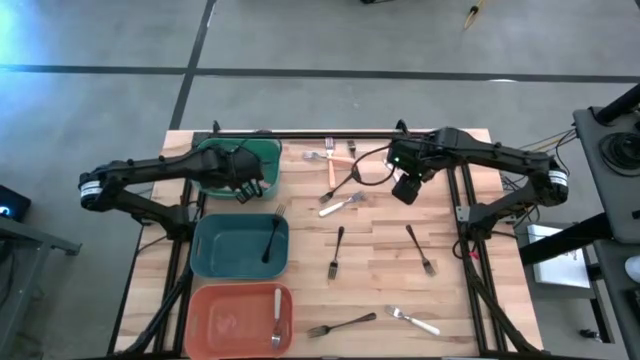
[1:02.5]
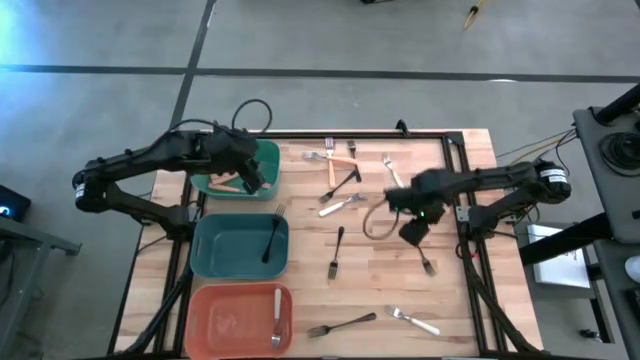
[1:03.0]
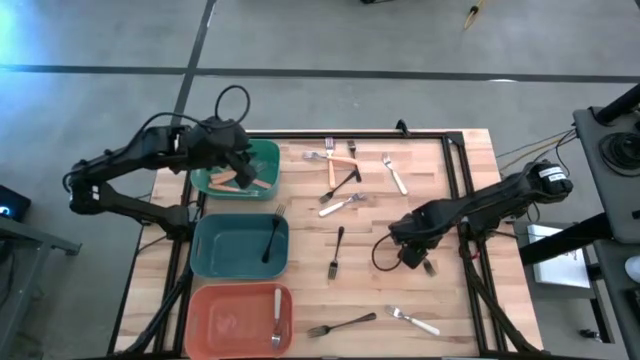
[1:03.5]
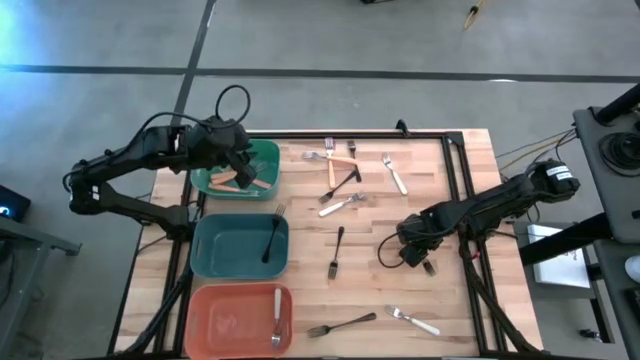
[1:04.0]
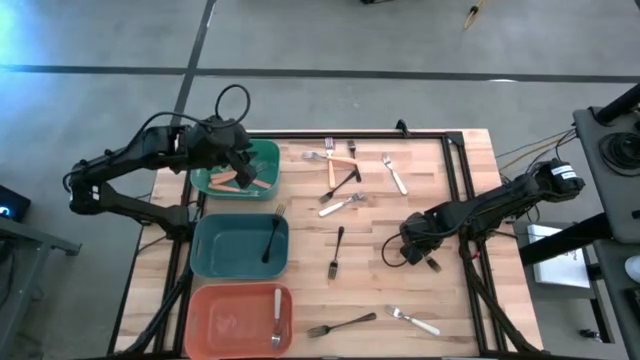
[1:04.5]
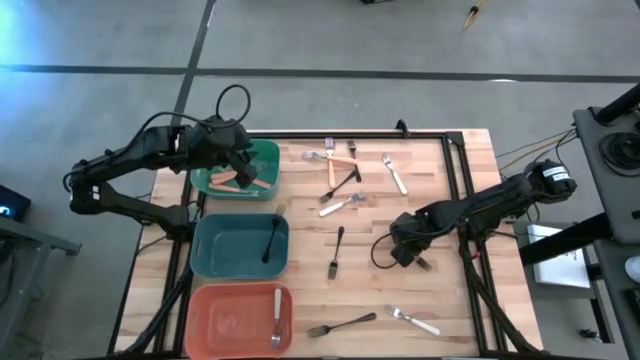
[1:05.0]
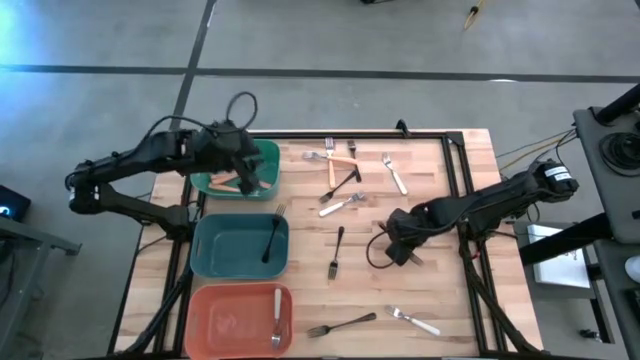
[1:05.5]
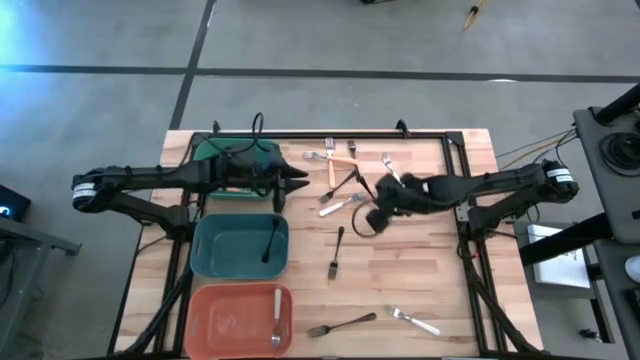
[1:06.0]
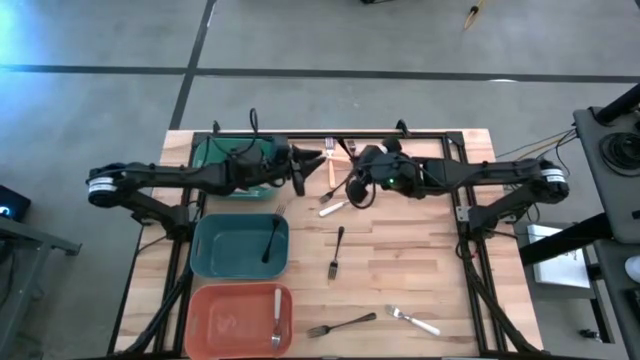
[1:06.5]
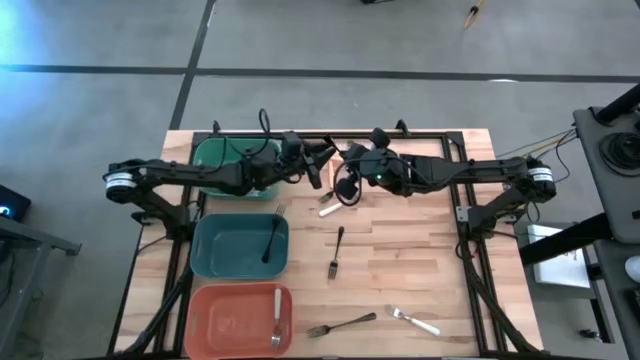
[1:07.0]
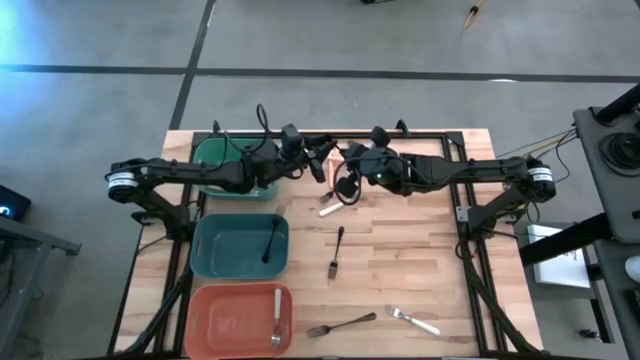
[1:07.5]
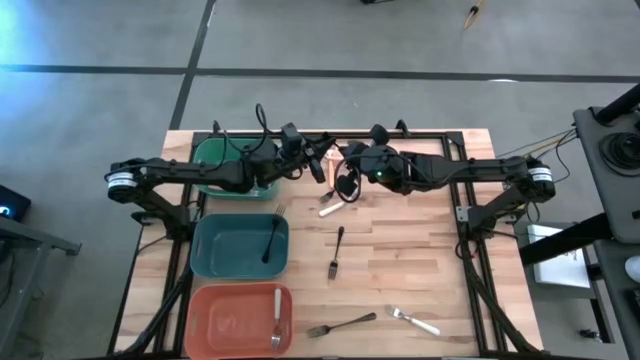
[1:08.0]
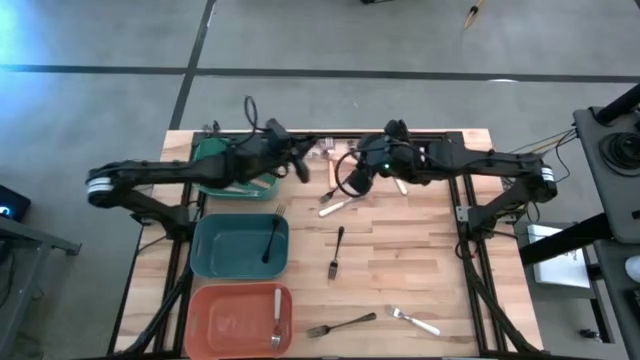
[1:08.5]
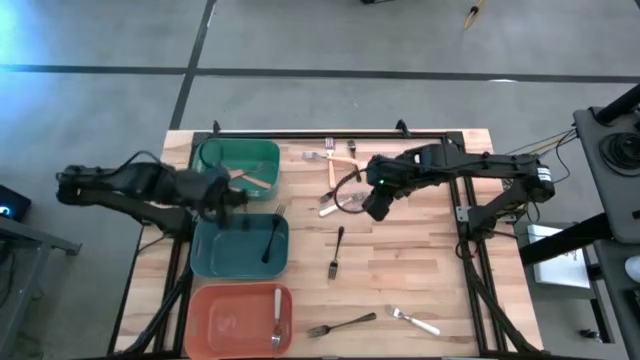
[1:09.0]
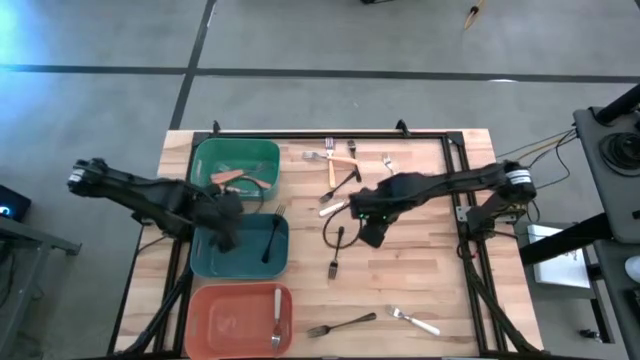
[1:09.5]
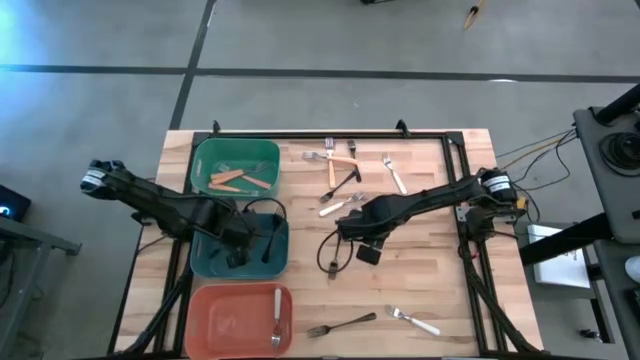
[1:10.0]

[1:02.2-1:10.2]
Task: Sort silverware by color (type)
Put the black fork into the blue bin

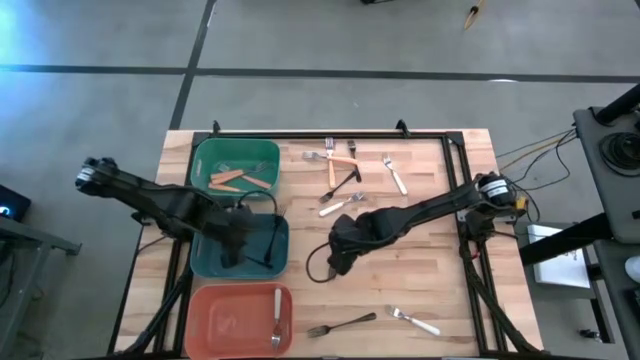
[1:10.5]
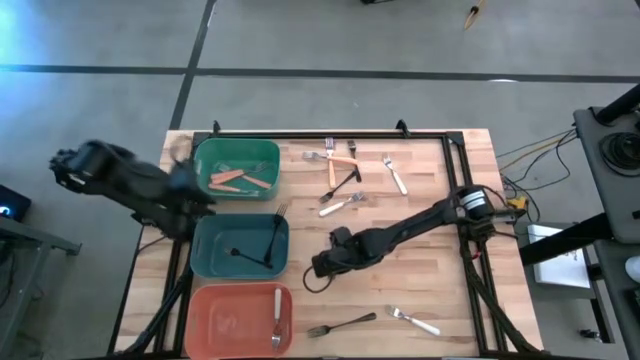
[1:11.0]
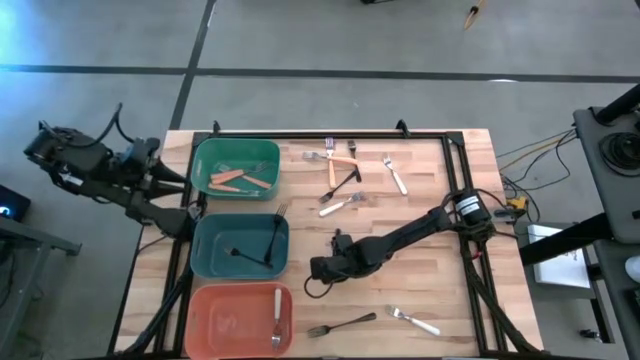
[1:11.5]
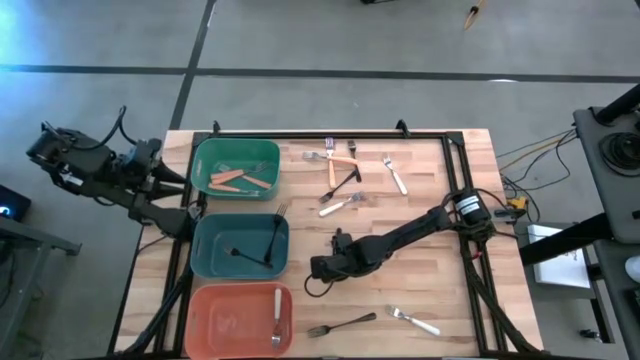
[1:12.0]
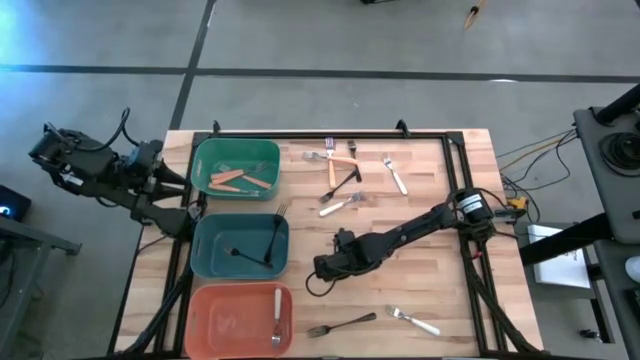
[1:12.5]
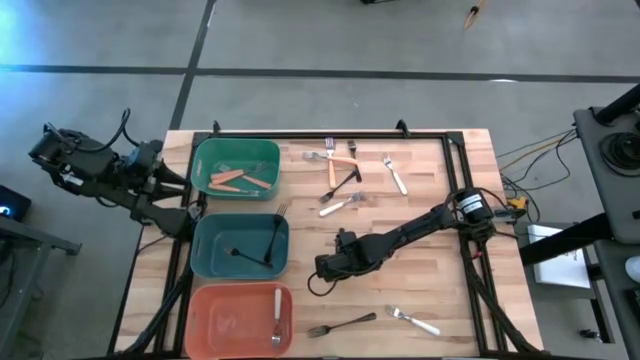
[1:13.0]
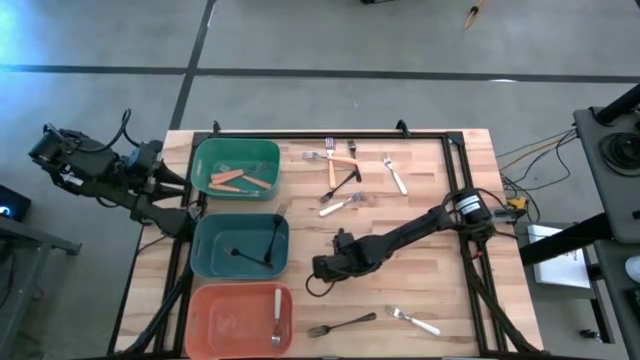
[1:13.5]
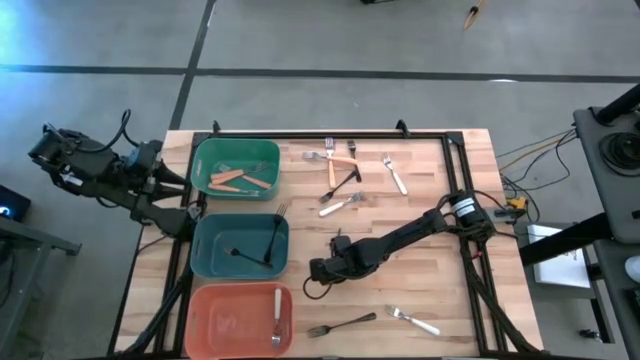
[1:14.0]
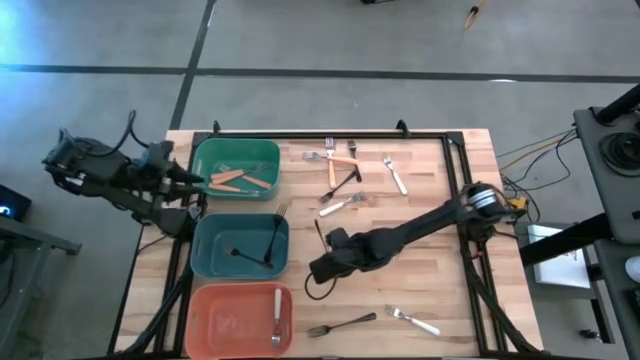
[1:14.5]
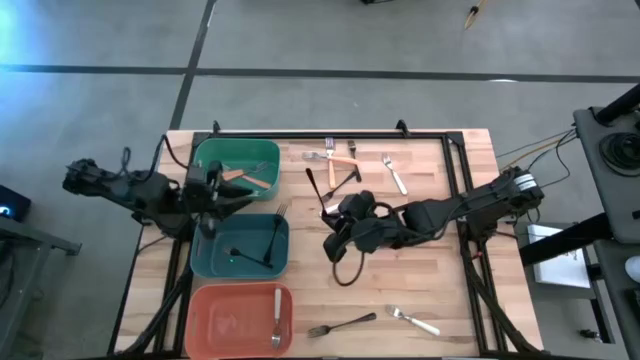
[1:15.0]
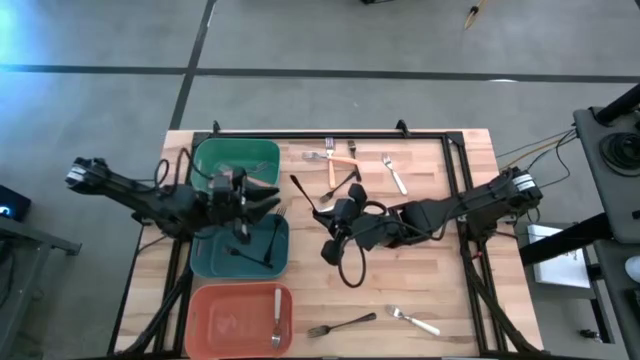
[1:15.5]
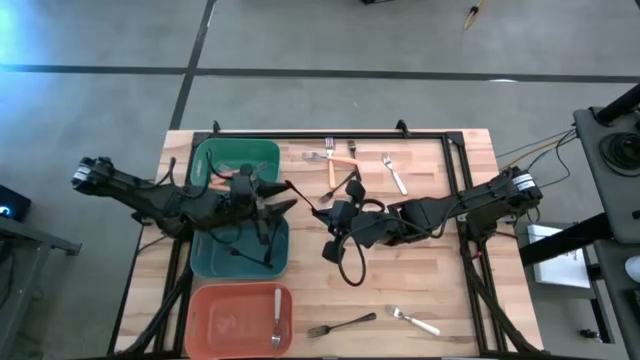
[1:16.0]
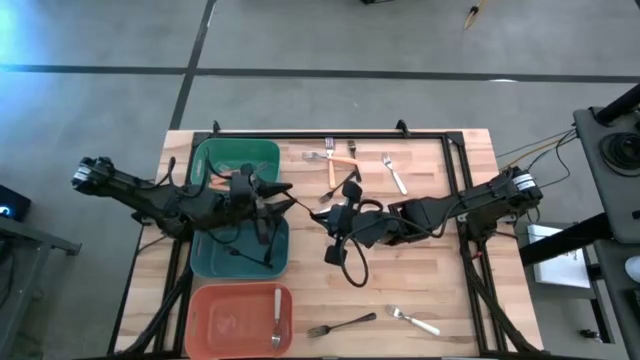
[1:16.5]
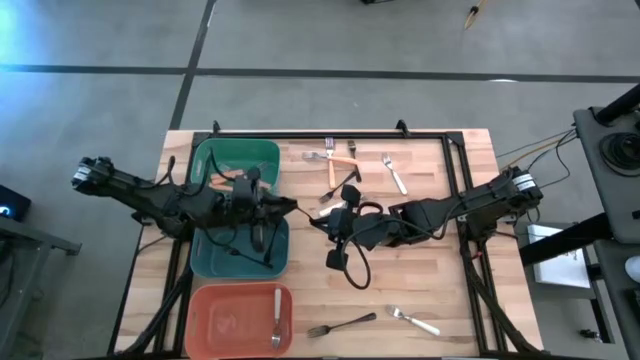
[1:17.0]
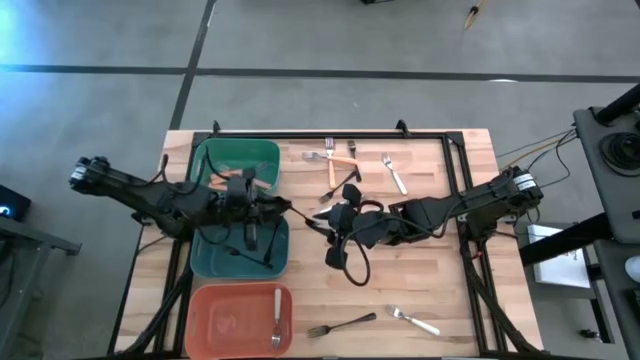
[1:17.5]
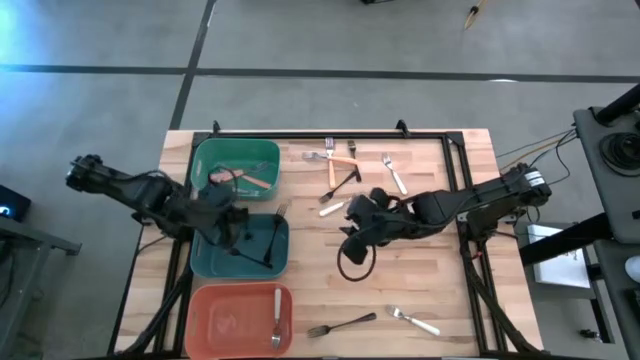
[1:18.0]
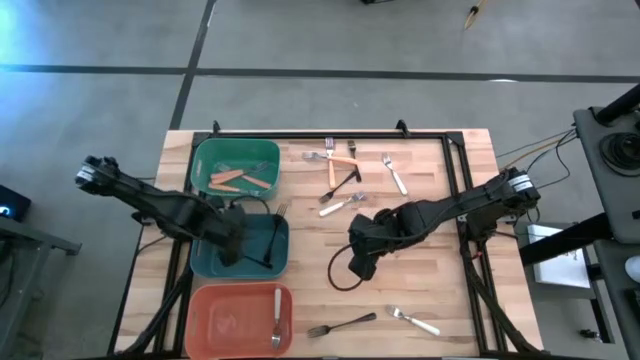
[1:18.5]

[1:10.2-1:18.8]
Put the black fork into the blue bin

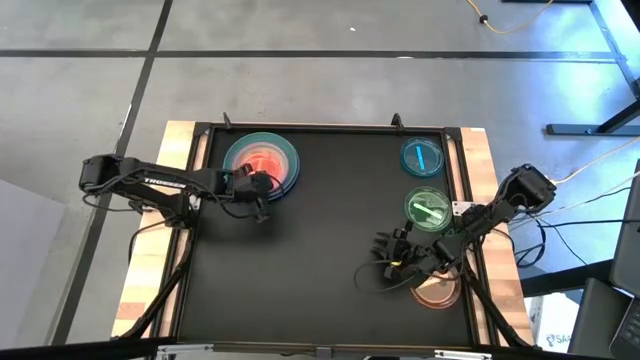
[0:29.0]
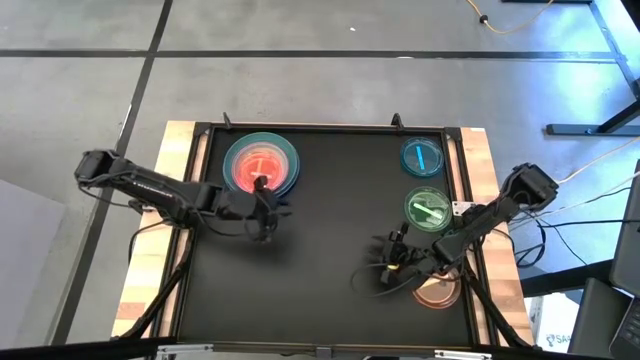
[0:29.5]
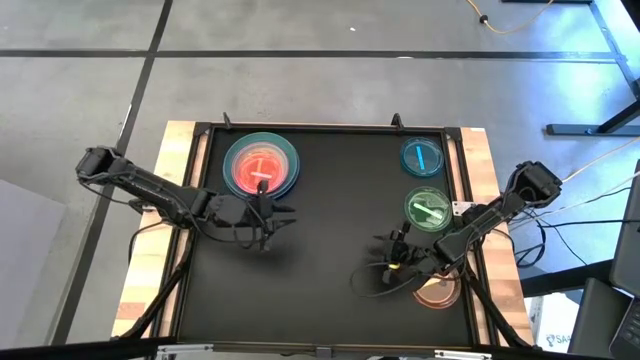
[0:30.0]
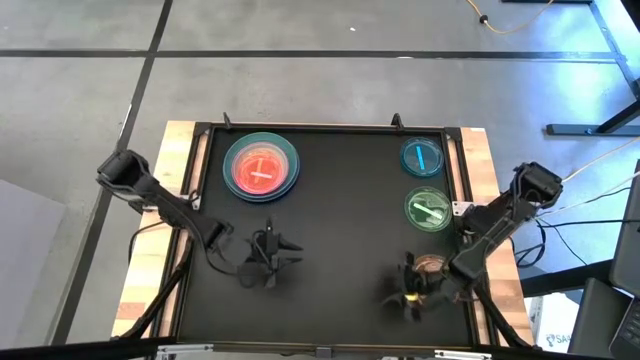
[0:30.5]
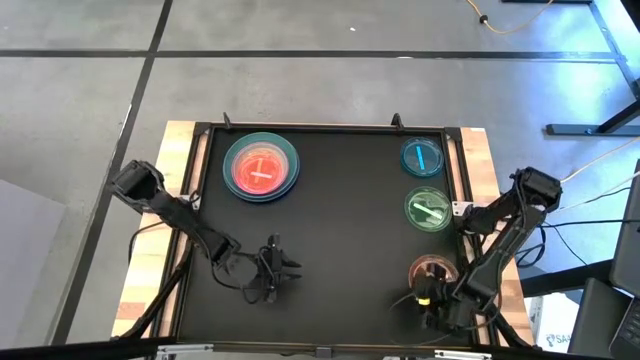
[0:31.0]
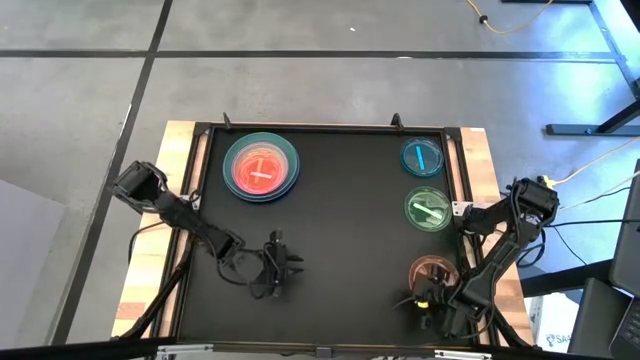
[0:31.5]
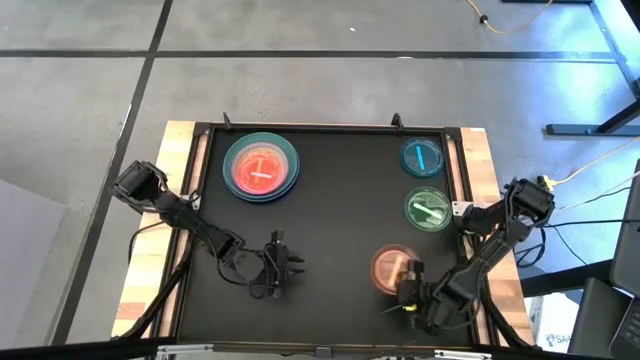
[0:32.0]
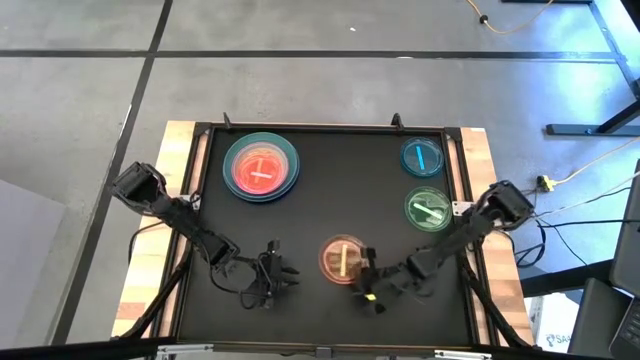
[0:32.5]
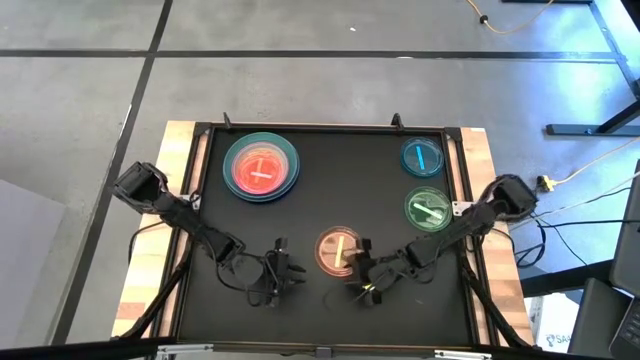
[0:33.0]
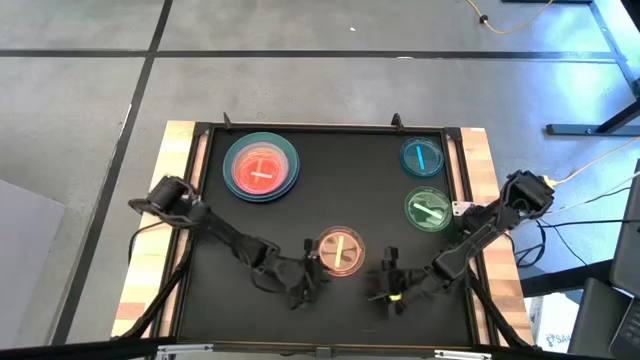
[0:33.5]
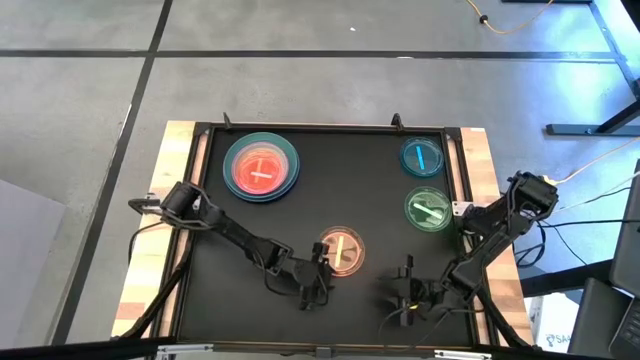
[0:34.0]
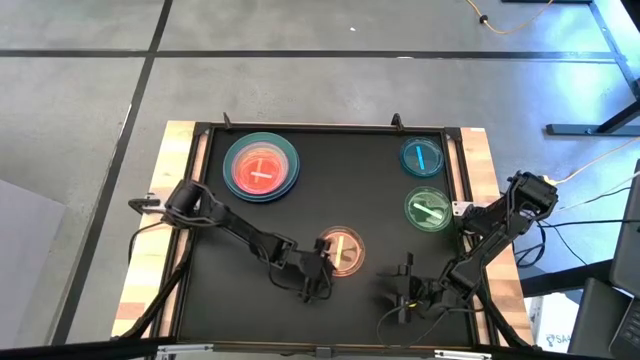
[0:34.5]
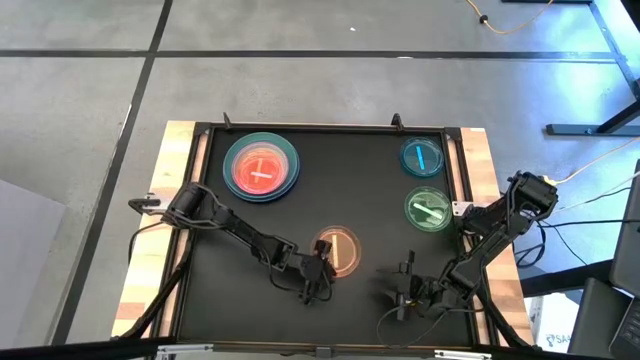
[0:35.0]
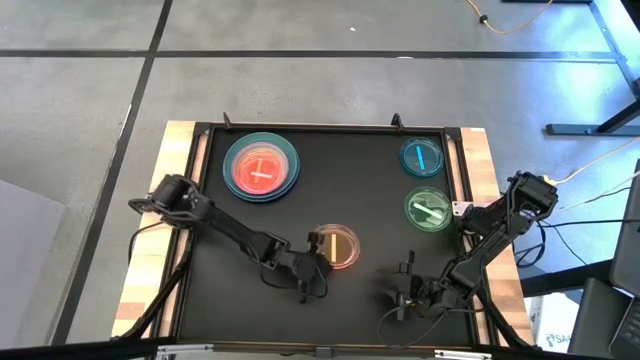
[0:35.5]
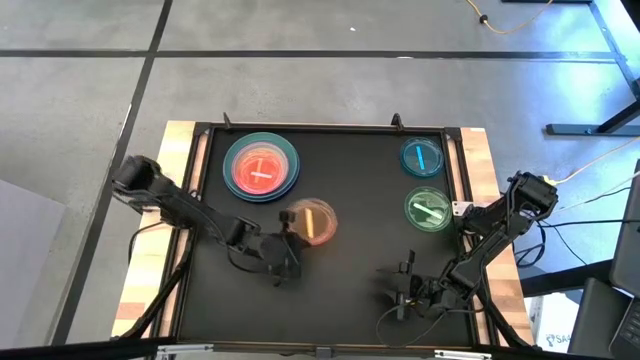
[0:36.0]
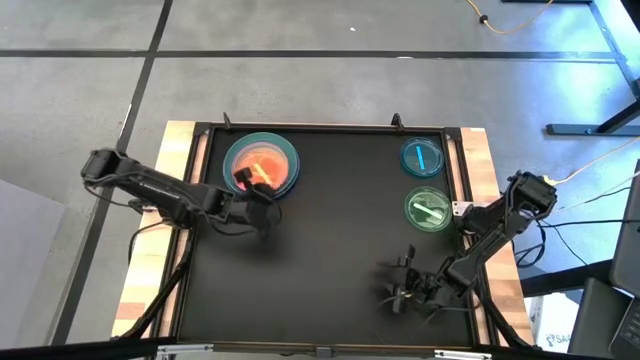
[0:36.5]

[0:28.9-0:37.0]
Task: Stack plastic plates
Stack the orange transparent plate on top of the pink transparent plate
